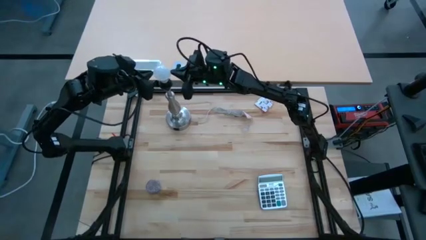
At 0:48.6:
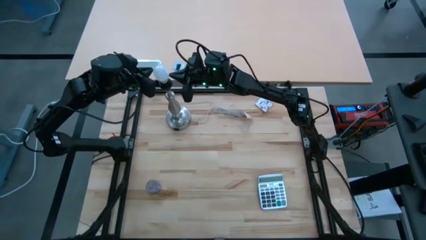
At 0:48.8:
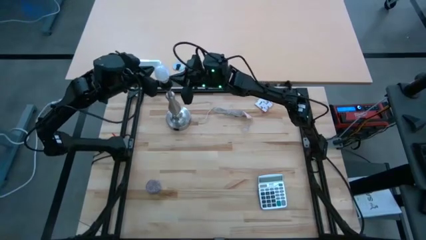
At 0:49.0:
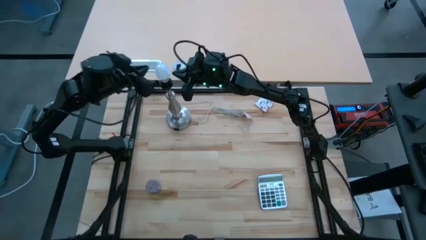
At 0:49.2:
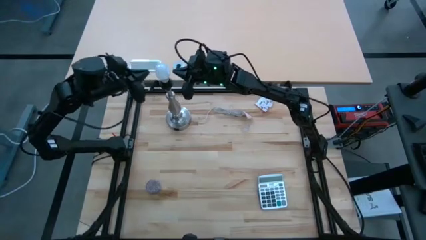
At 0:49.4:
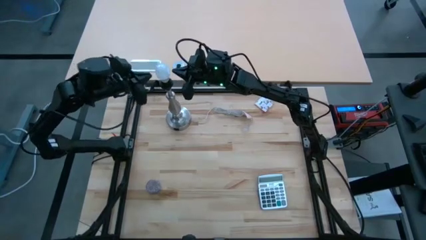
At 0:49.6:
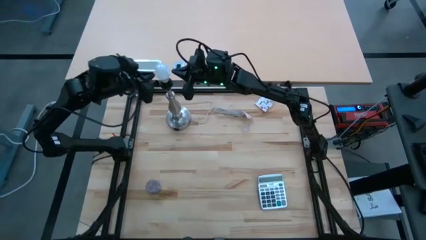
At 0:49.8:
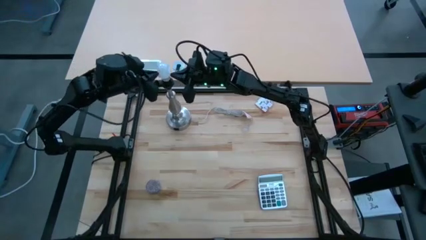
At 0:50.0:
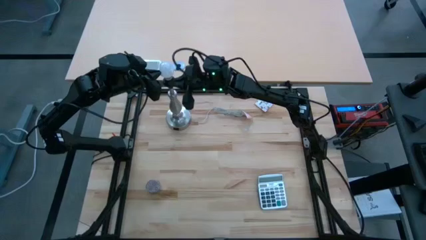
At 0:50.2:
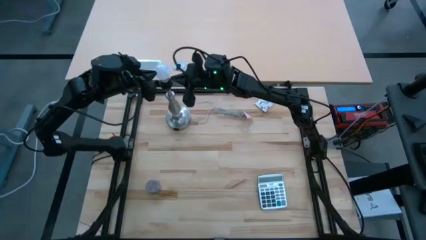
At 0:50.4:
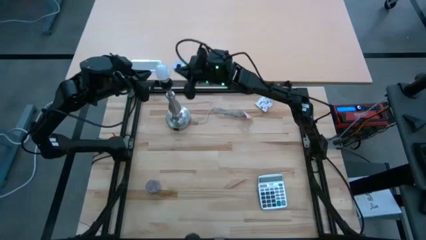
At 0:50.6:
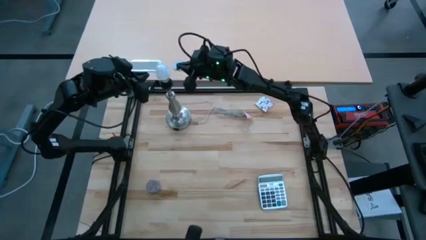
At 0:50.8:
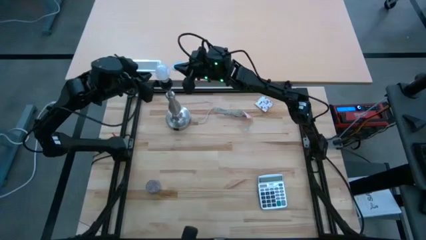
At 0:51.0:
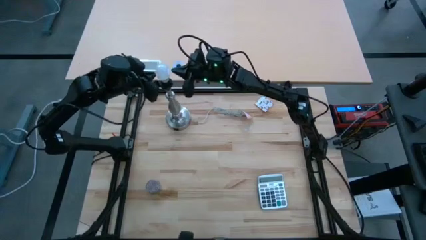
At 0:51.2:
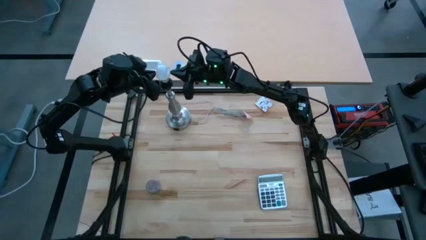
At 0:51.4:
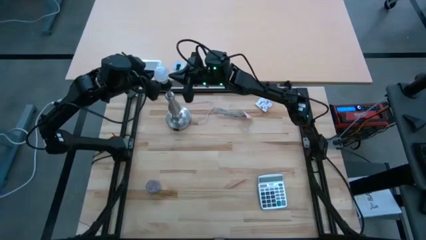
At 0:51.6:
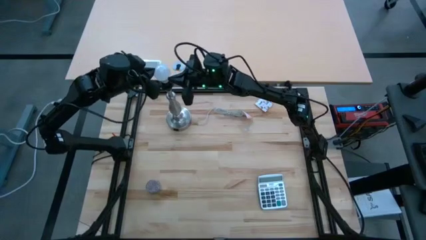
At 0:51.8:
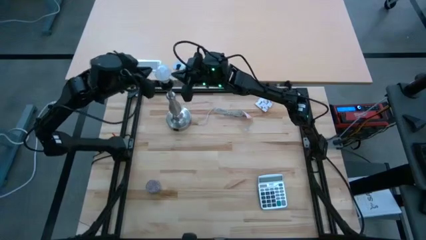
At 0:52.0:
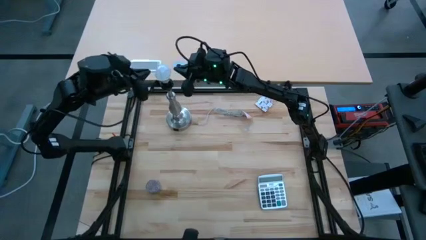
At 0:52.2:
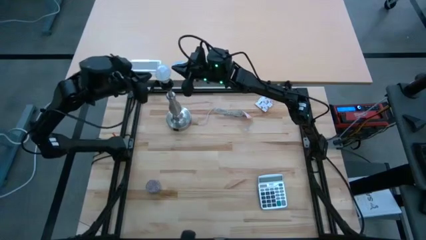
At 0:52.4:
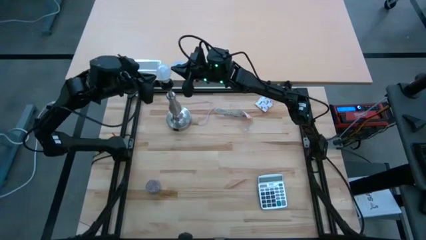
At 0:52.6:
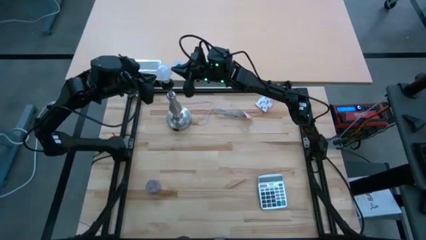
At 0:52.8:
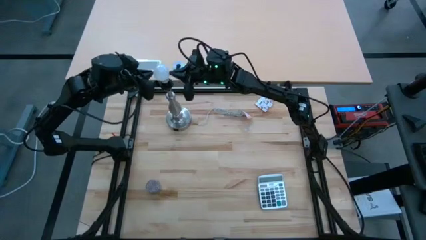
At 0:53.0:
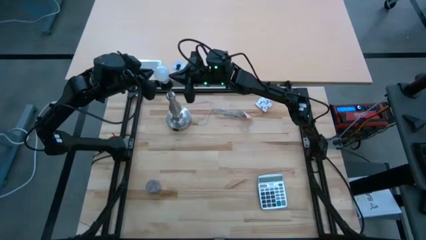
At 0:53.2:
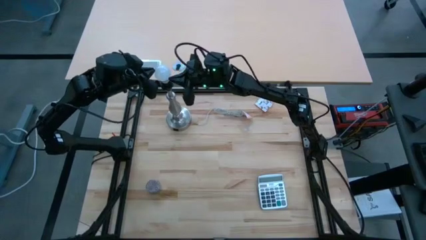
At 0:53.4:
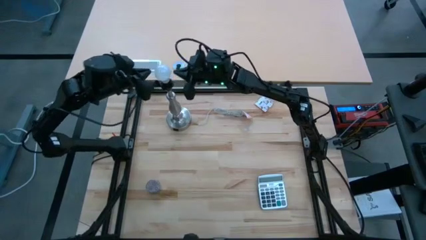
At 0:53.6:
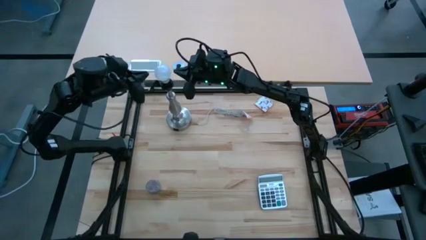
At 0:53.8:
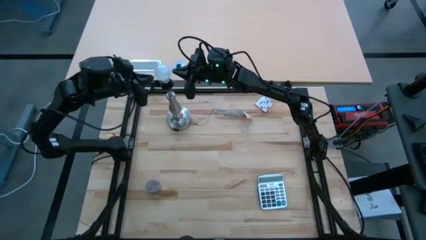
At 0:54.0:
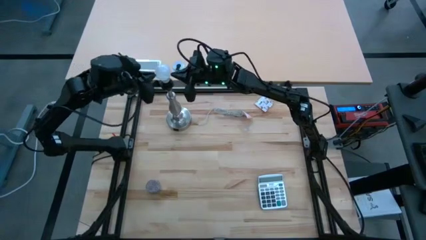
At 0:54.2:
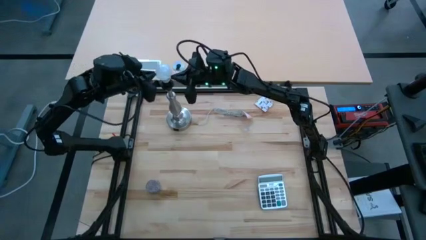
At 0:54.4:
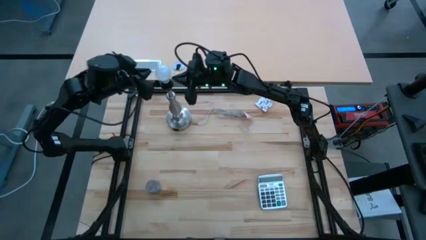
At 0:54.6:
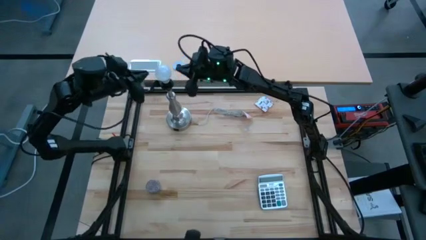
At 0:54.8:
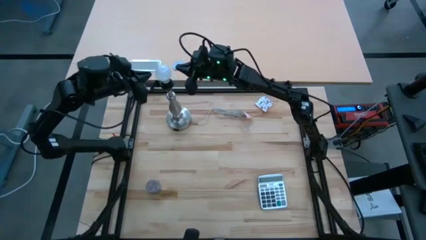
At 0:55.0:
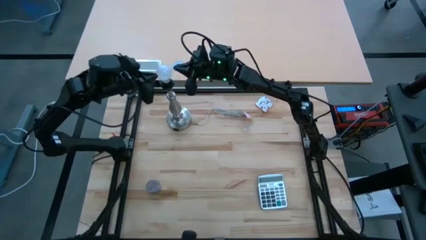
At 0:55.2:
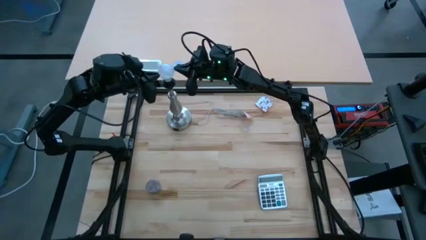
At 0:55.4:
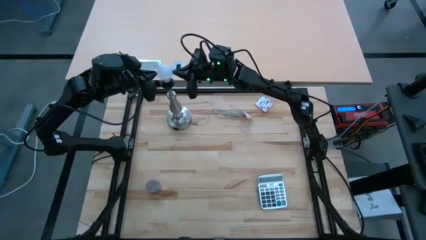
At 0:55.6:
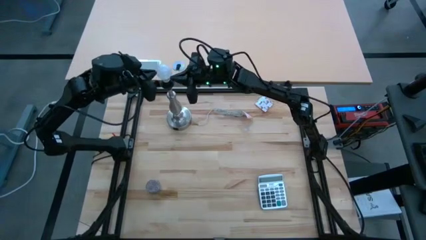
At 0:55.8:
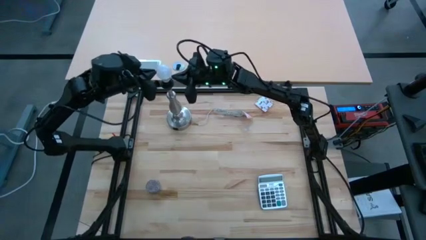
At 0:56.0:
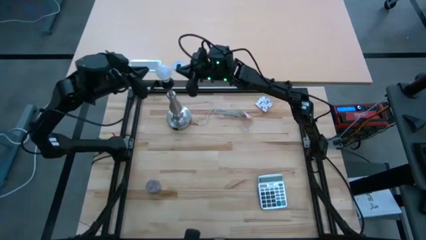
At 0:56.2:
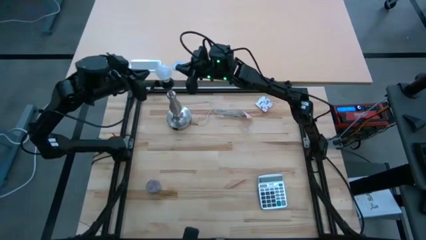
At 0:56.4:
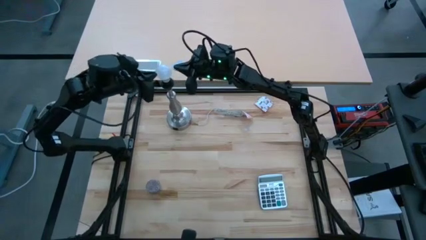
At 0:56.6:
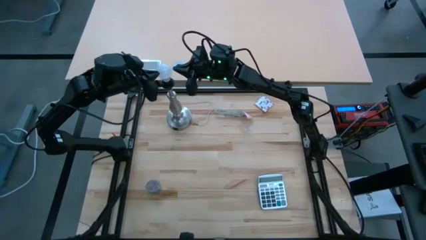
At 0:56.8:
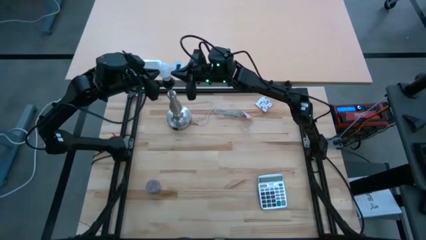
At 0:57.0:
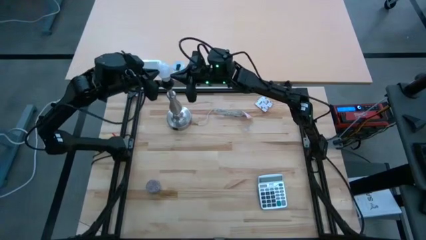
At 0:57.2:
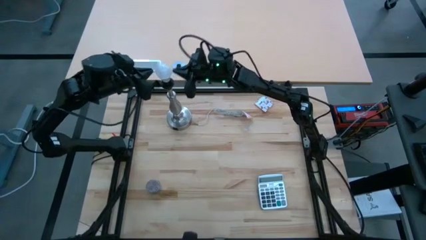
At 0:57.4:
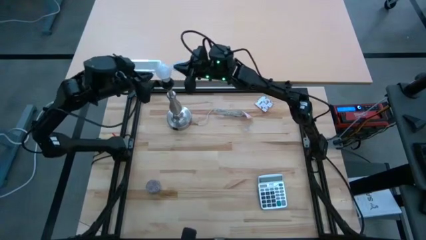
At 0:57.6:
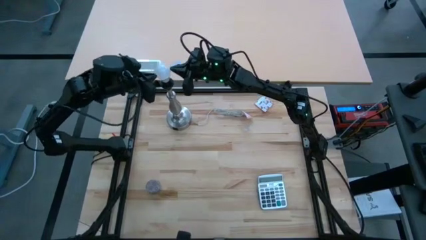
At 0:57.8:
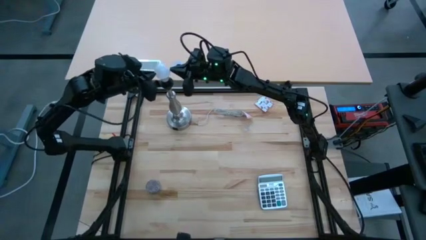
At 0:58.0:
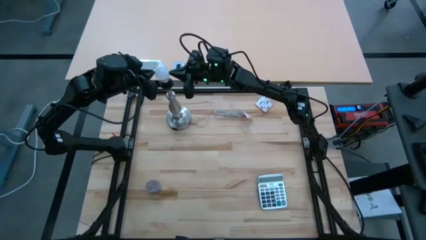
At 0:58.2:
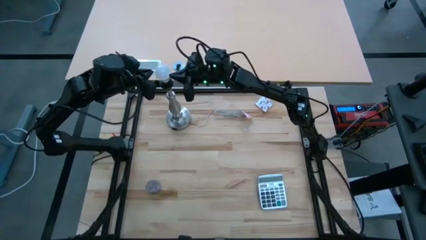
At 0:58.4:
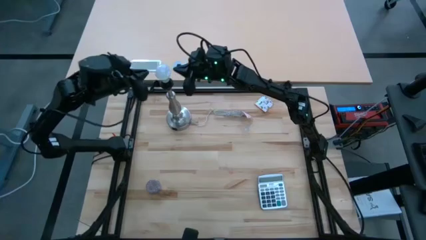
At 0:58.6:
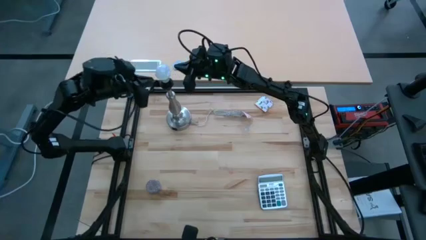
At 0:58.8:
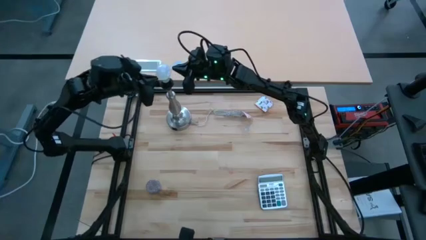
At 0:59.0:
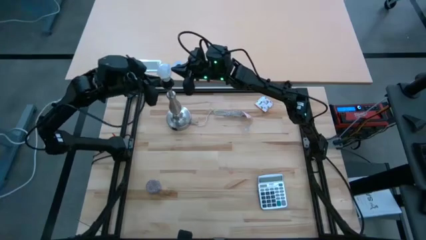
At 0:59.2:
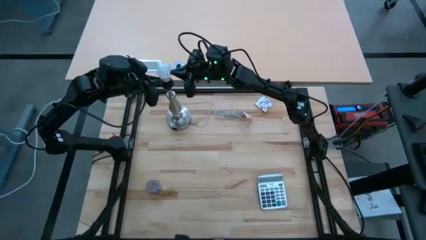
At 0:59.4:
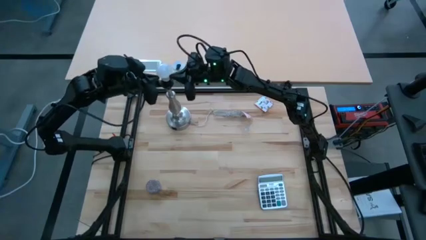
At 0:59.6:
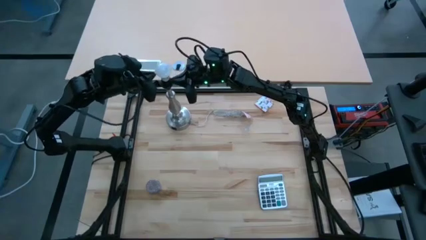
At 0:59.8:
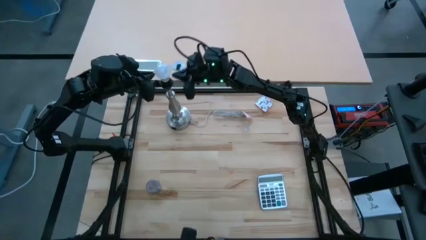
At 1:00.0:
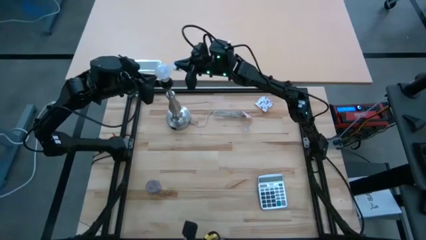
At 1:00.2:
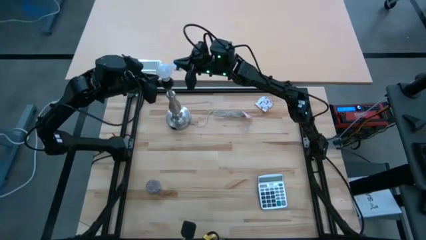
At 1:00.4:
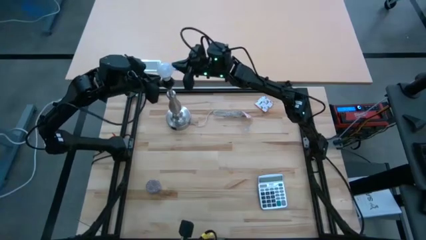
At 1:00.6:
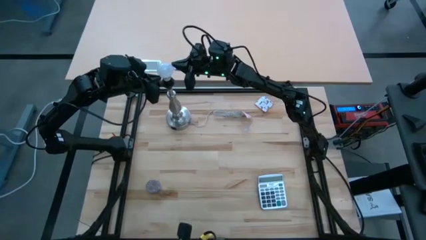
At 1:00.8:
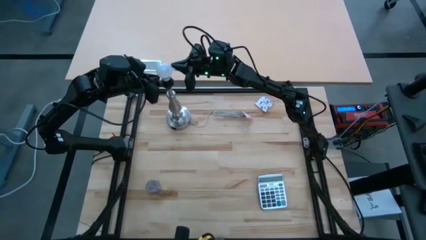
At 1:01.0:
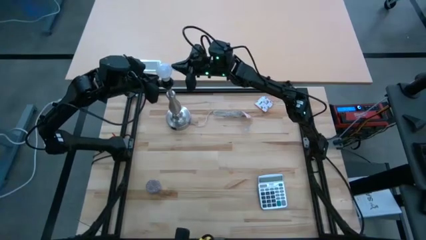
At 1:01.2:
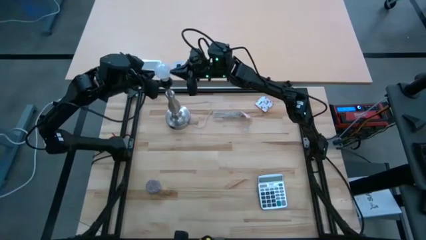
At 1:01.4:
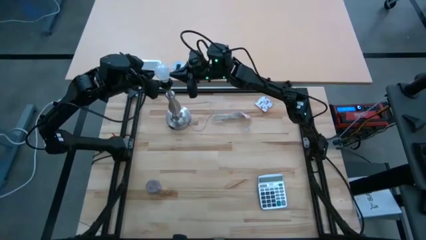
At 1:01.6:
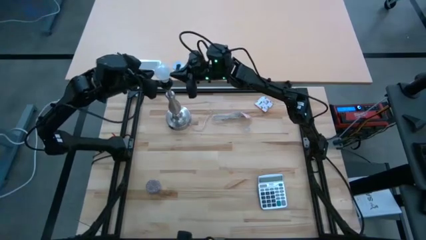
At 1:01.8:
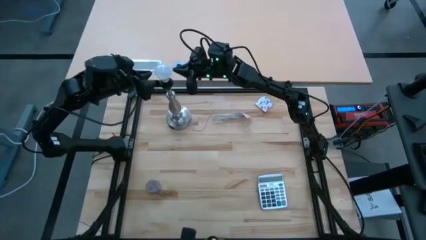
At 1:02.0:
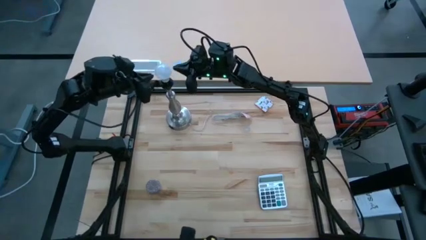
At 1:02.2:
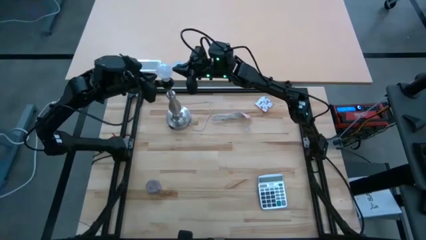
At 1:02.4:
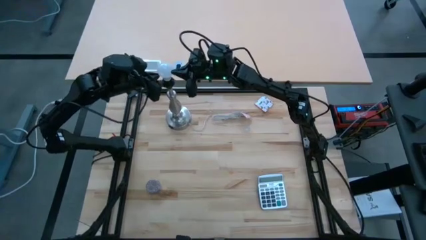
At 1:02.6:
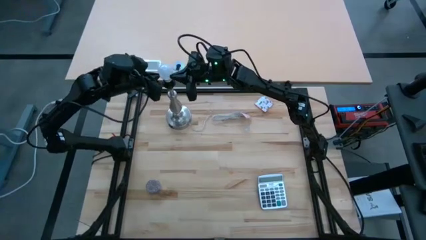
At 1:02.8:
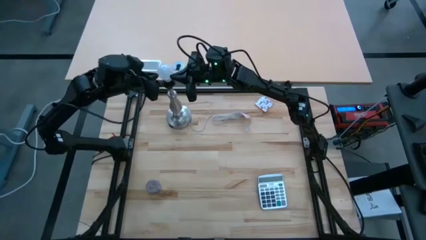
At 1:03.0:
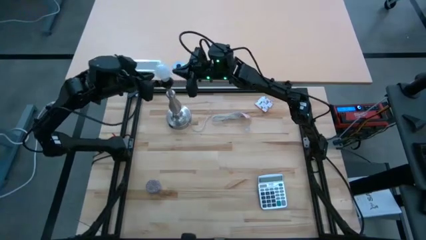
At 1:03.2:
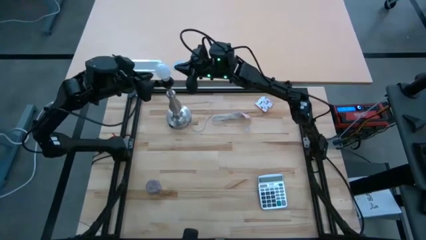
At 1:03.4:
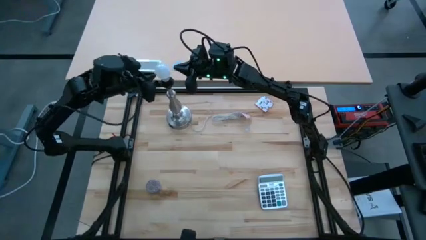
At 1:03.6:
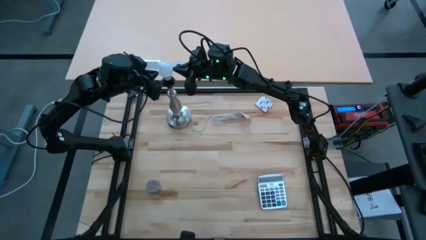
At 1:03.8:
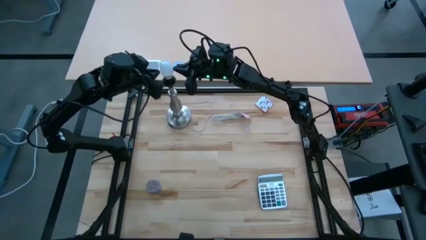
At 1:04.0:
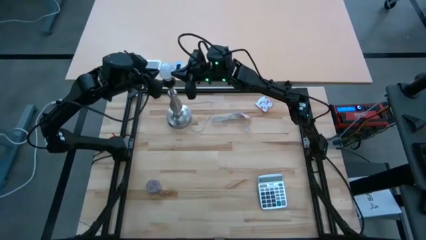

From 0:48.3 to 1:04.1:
Task: Screw lightbulb
Insert the lightbulb into the lamp

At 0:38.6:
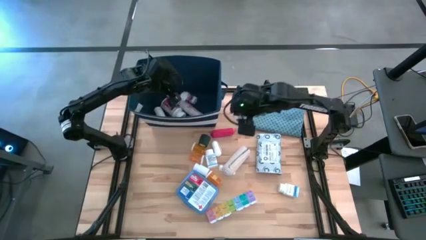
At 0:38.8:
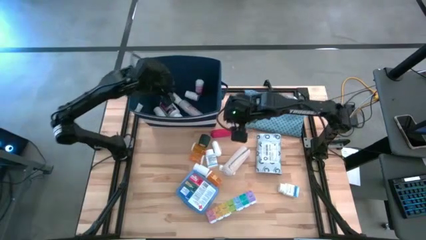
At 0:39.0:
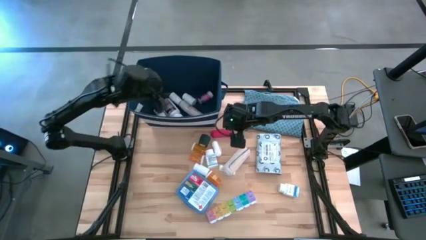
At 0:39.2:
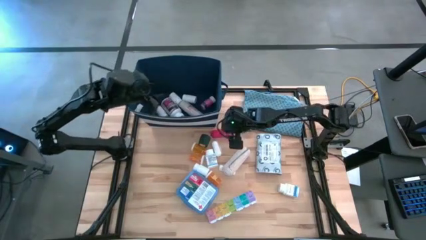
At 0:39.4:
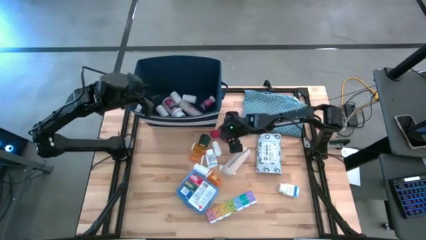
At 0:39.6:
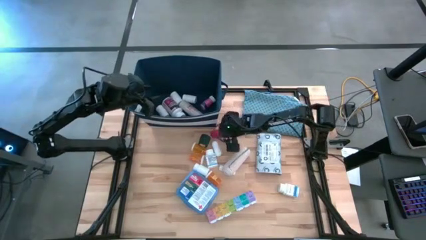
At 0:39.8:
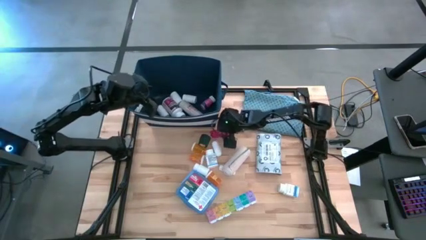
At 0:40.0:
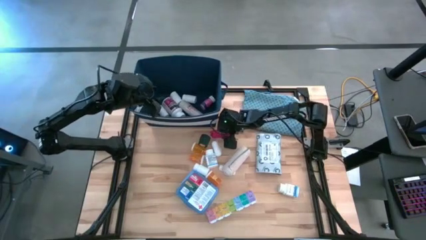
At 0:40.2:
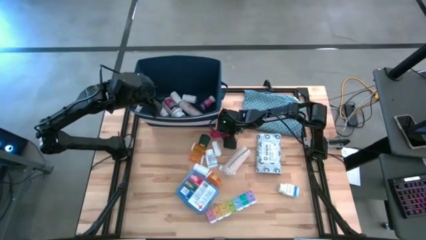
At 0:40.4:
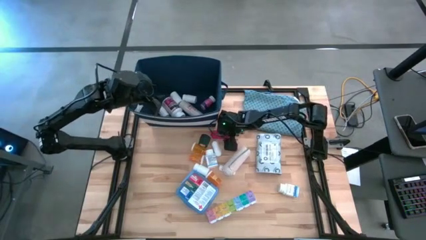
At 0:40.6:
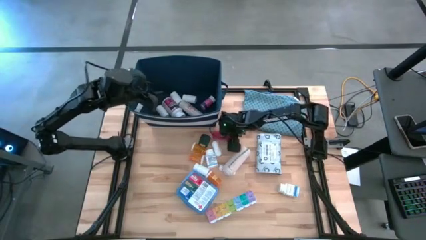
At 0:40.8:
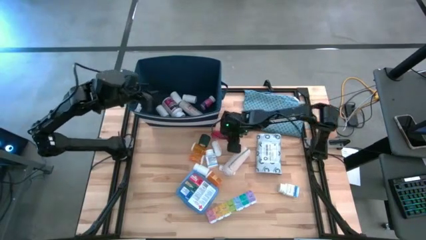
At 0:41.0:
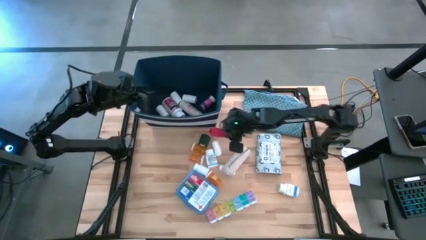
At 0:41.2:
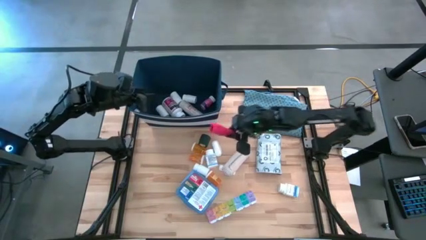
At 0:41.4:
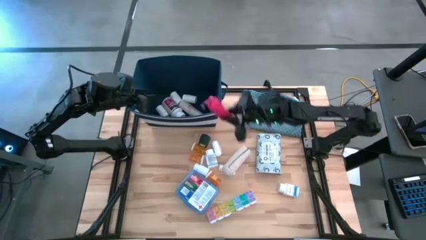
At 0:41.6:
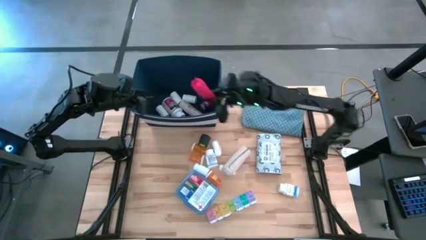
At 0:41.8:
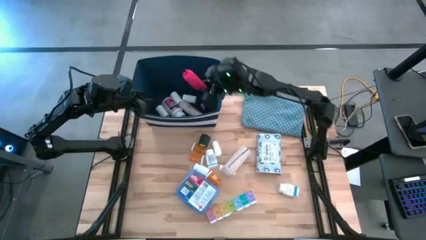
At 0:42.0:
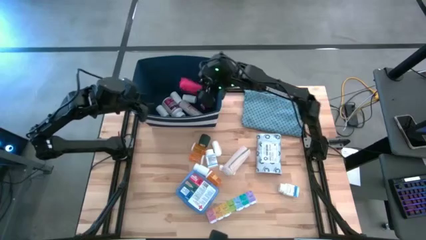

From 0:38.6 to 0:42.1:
Task: Pick & place medical supplies in basket/bin
Put the red bandage into the blue bin
